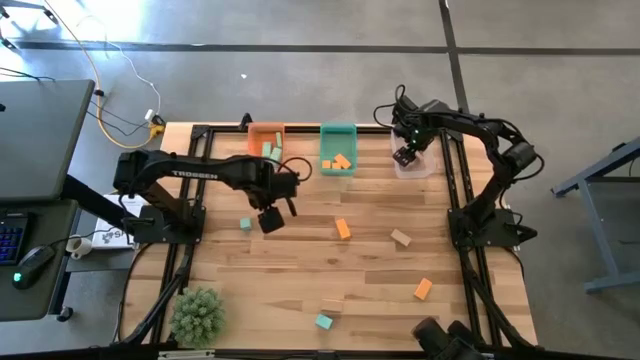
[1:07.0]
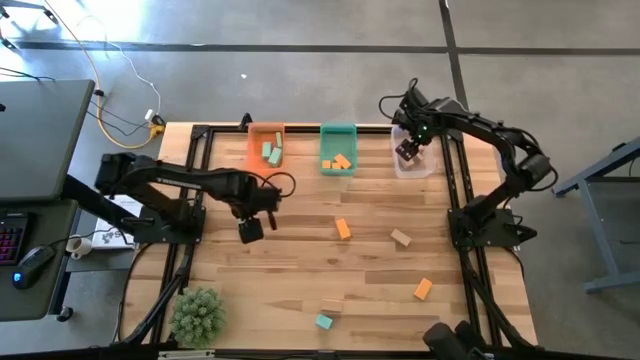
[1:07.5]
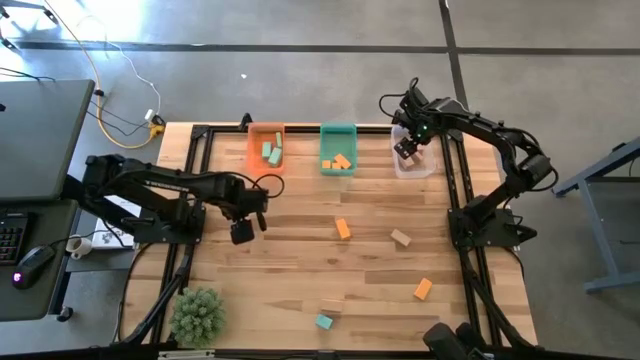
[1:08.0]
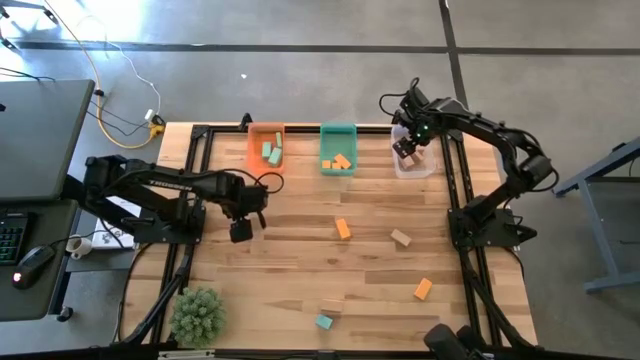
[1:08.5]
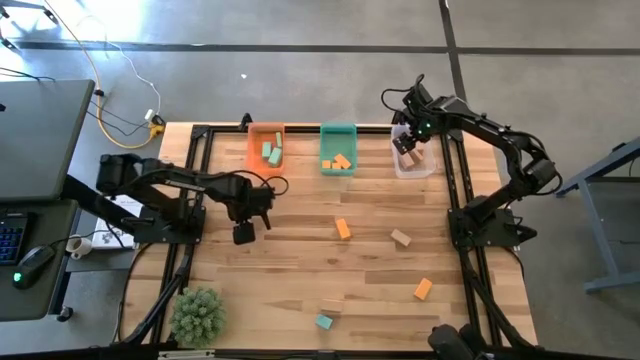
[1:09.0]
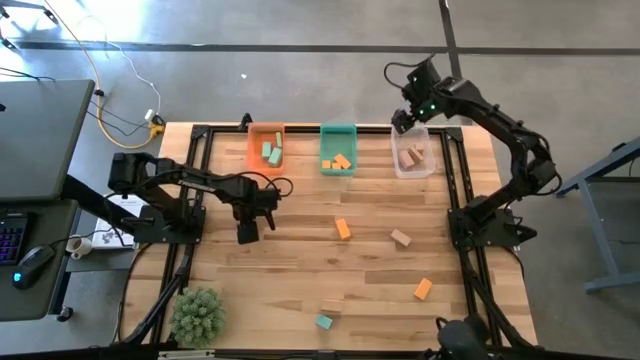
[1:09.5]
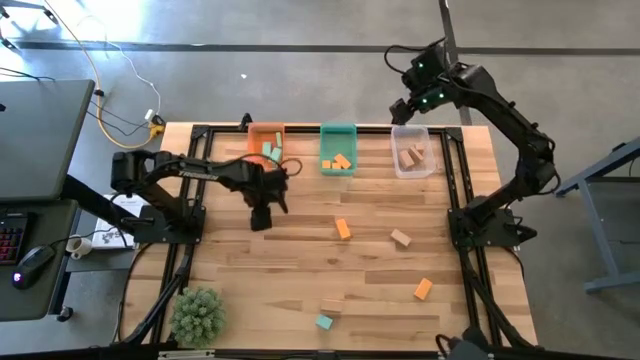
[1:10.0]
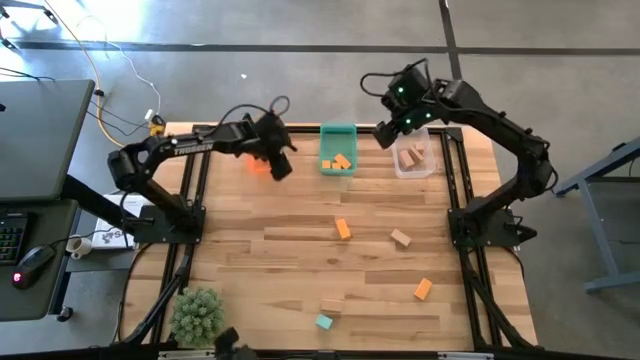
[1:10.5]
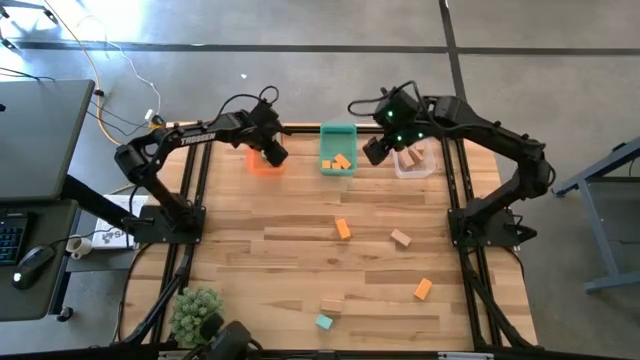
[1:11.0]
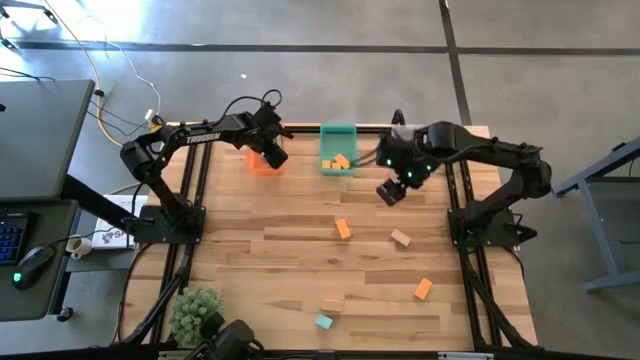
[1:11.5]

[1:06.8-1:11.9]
Task: Sort & place blocks by color
Put the light blue block into the orange bin

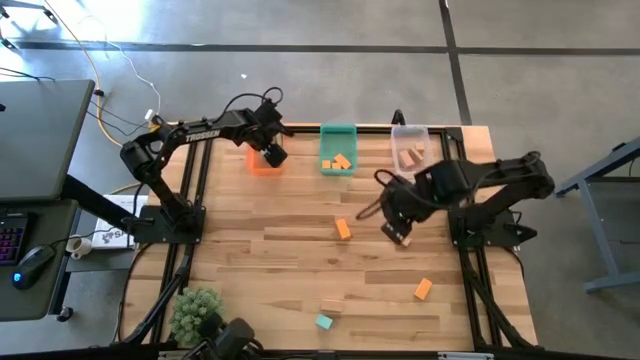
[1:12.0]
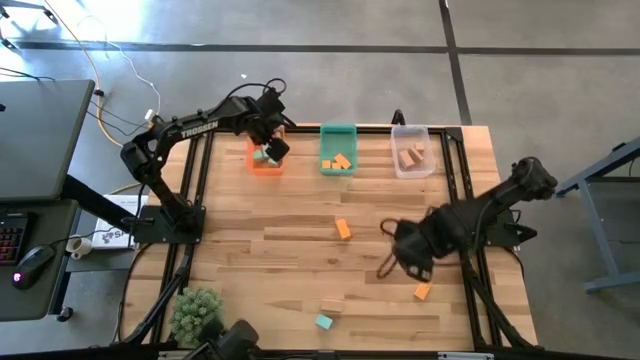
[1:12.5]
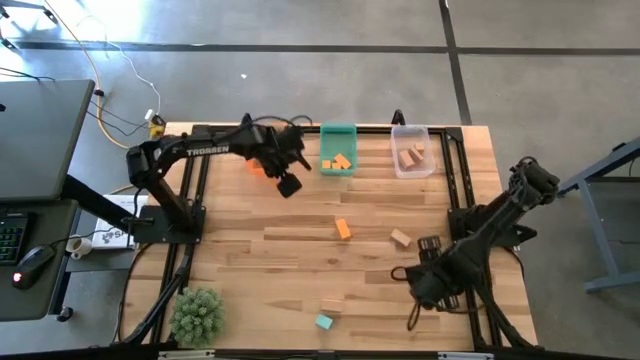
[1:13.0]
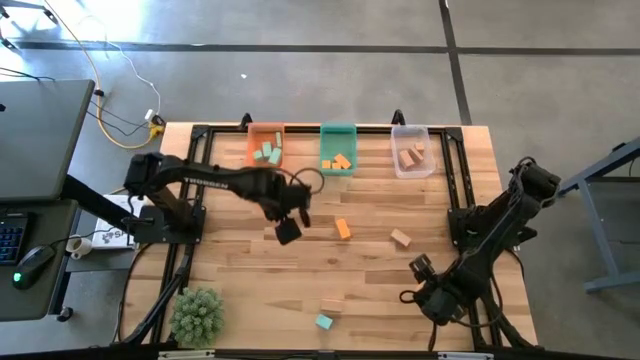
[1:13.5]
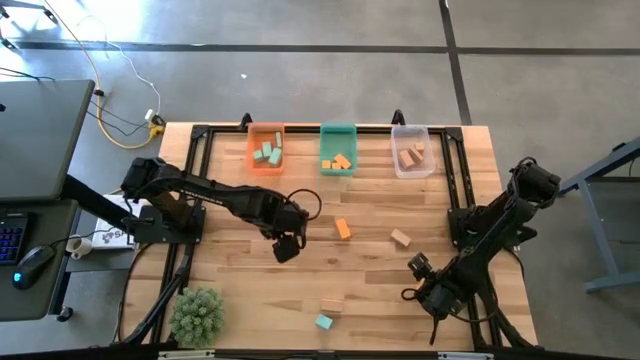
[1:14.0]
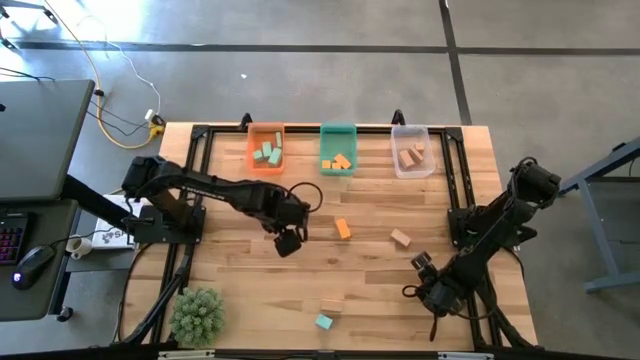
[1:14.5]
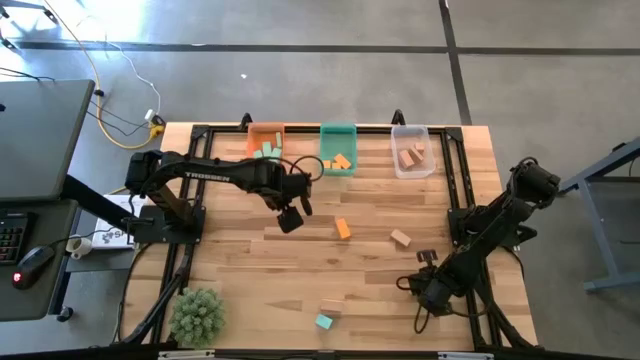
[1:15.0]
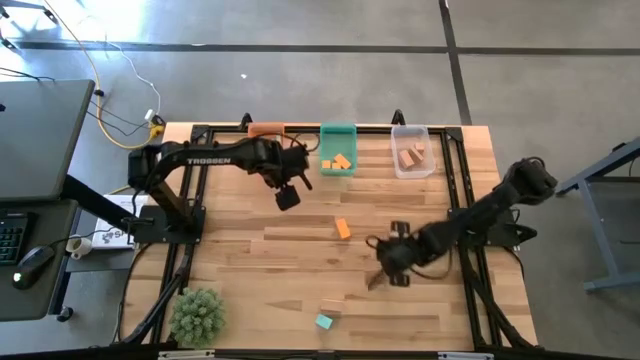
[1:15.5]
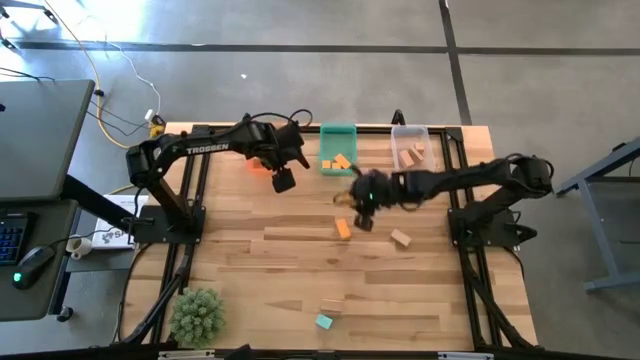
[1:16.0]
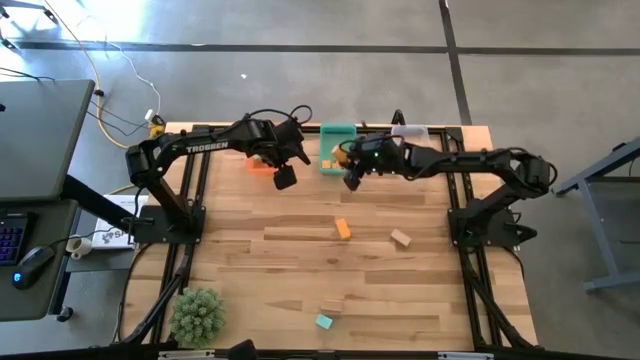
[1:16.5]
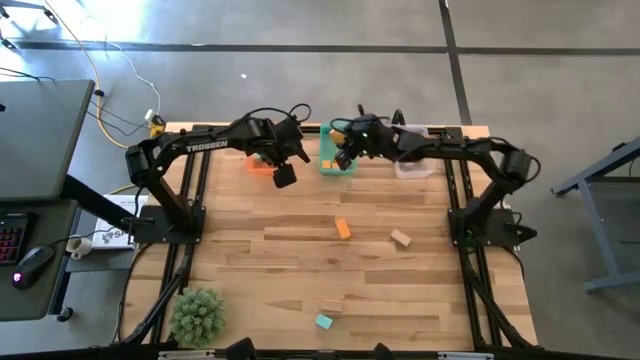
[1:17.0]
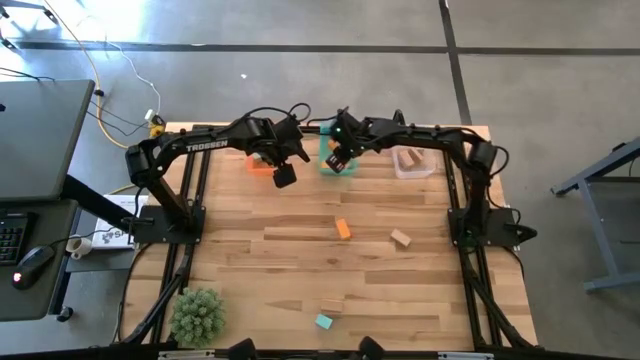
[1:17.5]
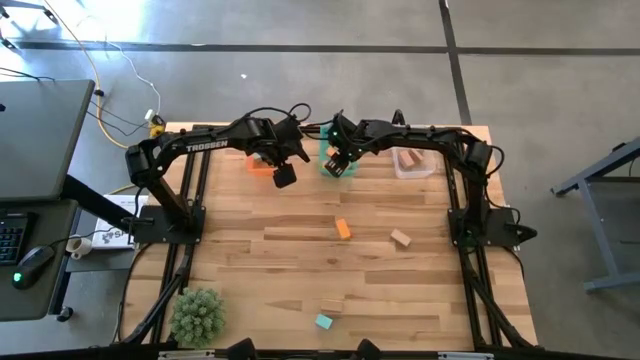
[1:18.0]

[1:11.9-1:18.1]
Put the yellow block into the blue bin

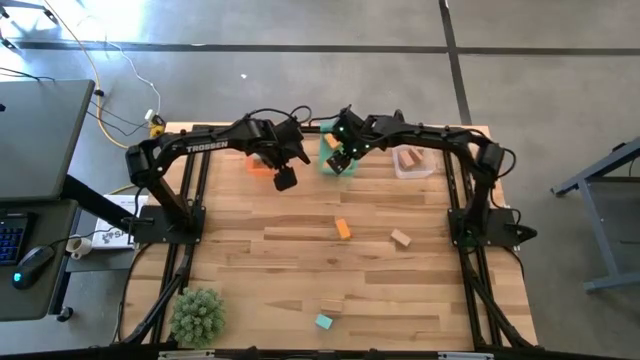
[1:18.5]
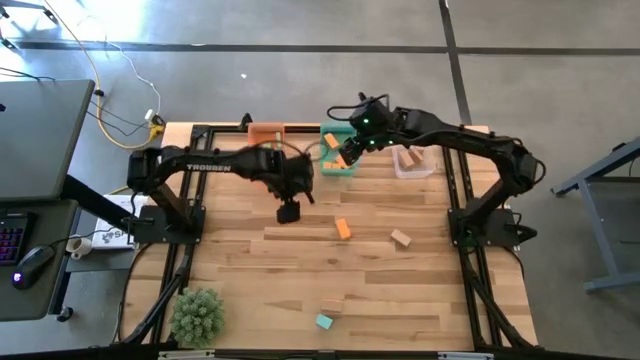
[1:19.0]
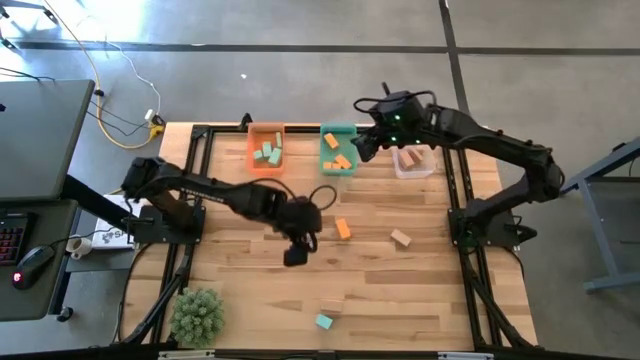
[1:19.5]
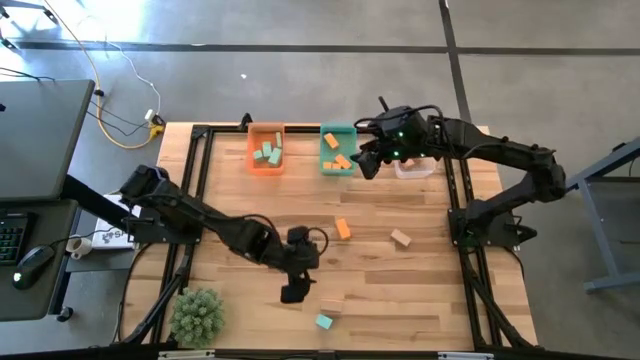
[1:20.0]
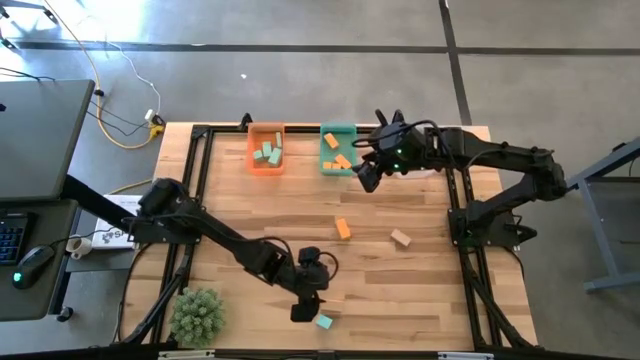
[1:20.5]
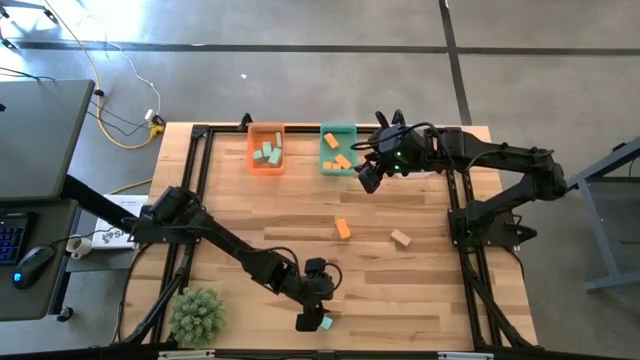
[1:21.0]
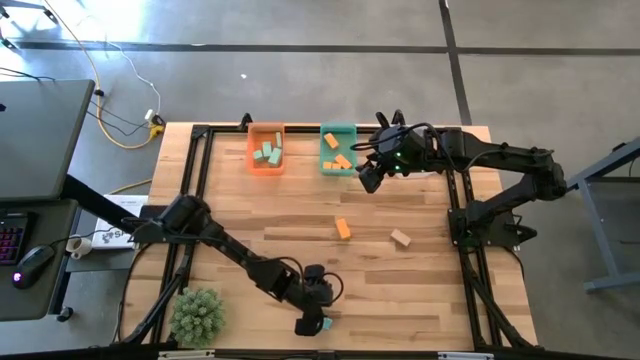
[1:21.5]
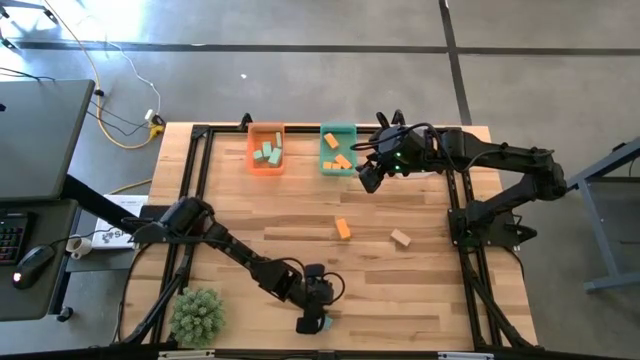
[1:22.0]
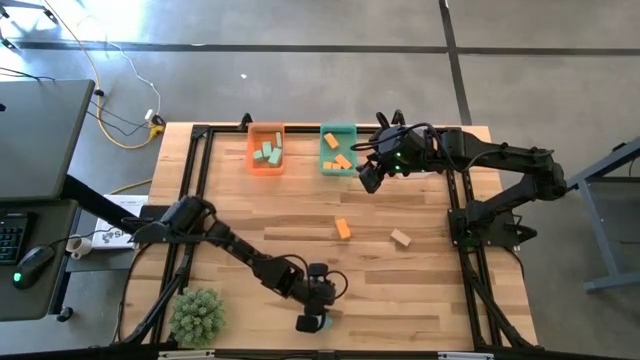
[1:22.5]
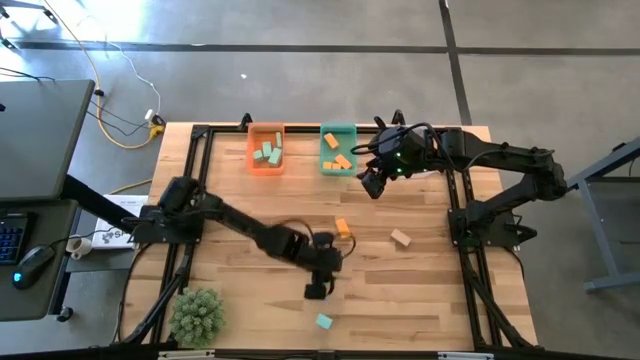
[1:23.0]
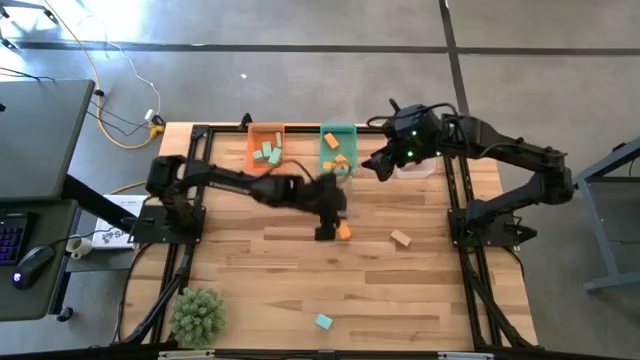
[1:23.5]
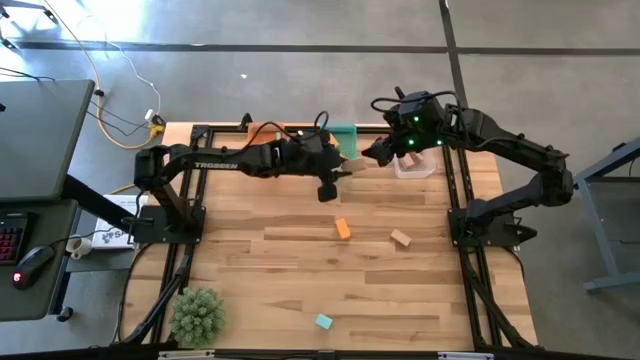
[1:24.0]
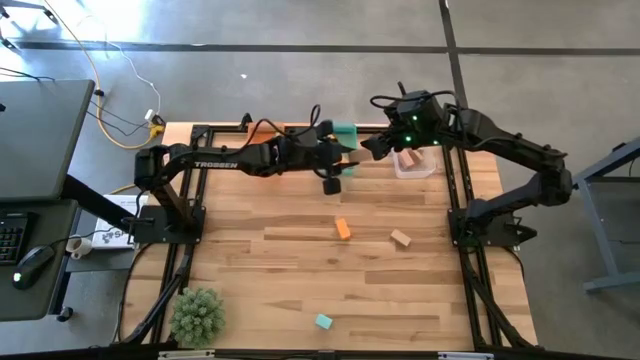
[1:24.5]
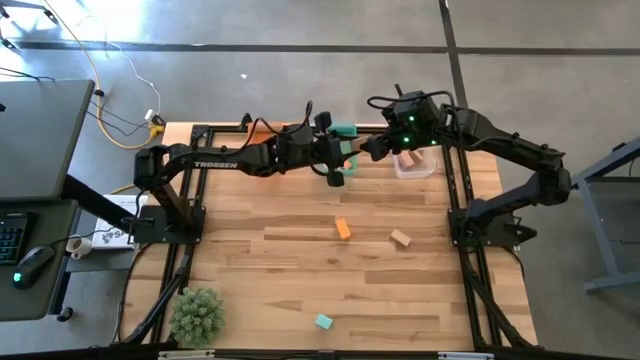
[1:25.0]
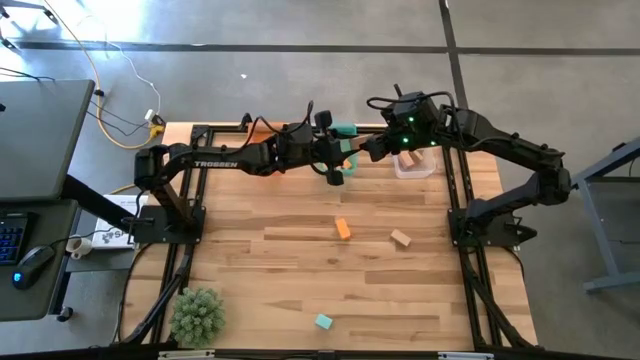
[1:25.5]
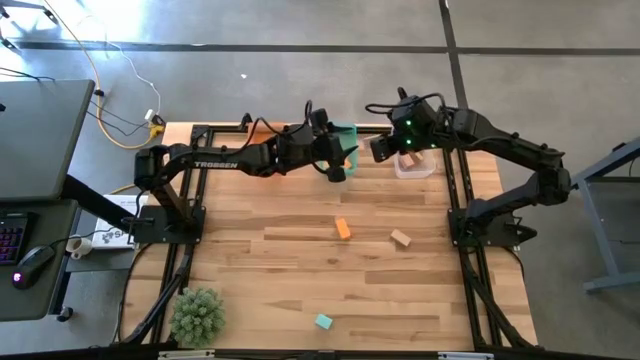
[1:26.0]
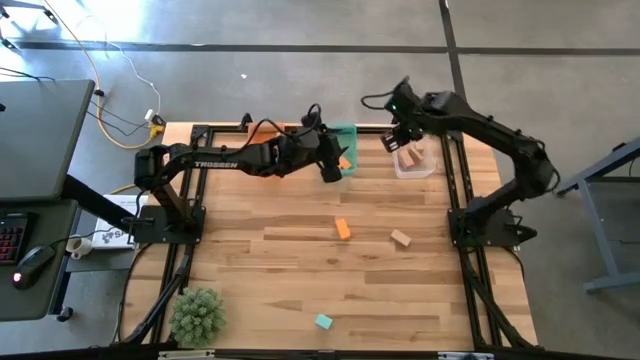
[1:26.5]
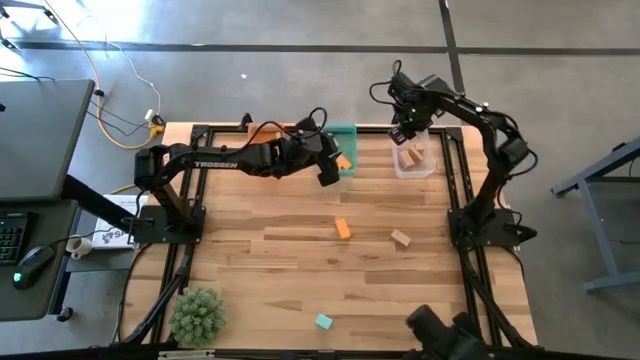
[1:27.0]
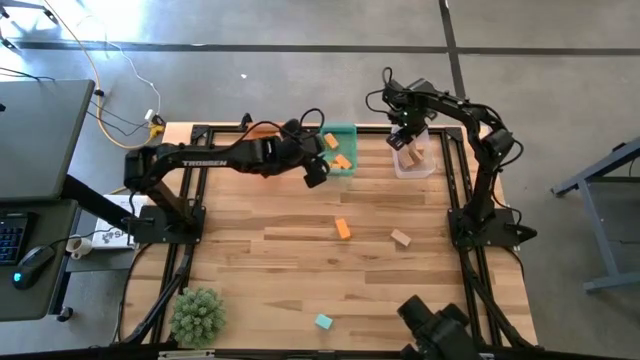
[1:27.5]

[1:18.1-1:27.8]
Put the brown block into the transparent bin
